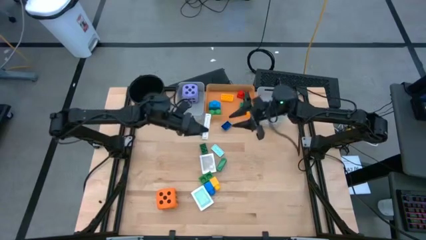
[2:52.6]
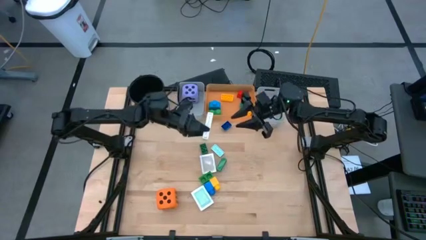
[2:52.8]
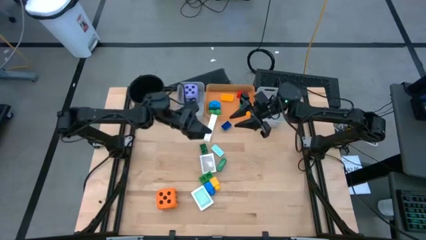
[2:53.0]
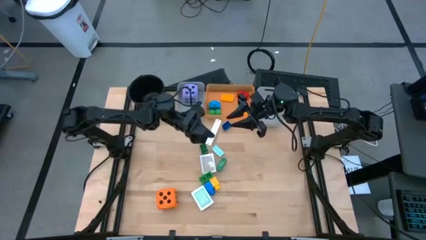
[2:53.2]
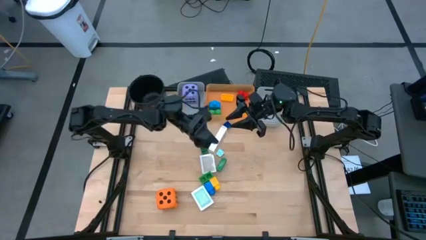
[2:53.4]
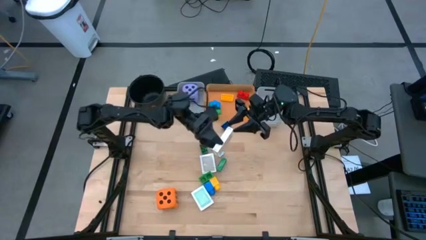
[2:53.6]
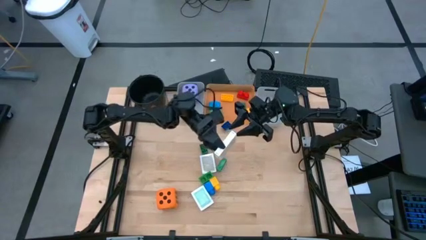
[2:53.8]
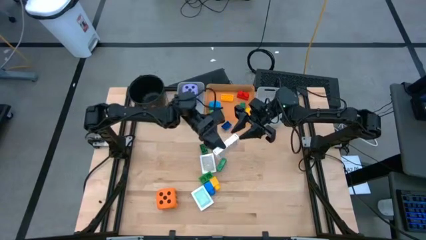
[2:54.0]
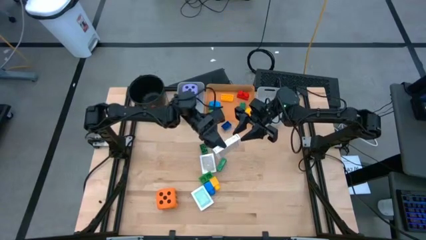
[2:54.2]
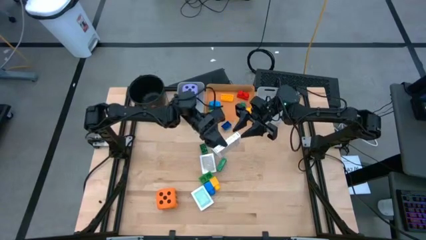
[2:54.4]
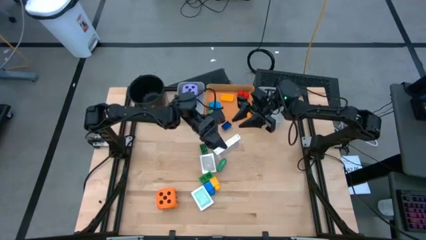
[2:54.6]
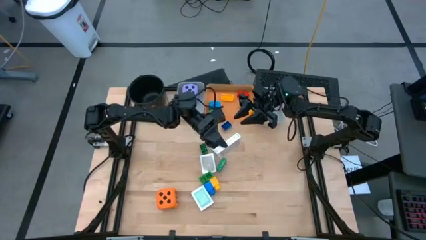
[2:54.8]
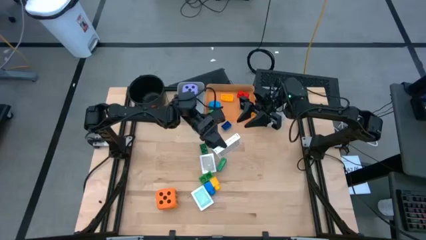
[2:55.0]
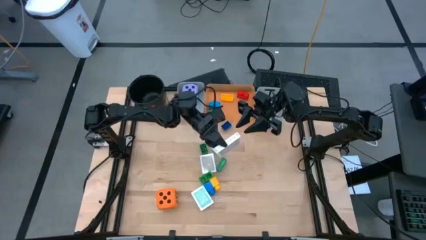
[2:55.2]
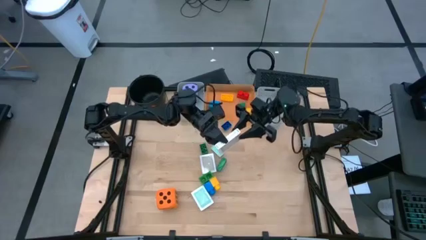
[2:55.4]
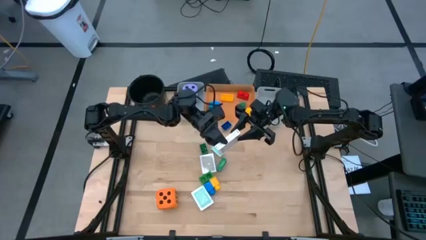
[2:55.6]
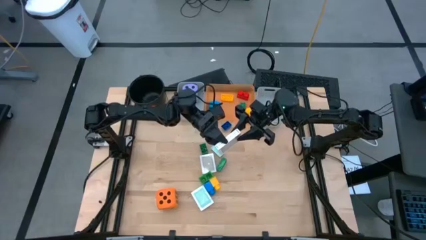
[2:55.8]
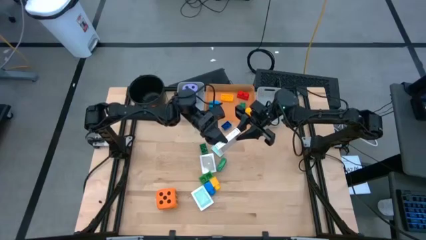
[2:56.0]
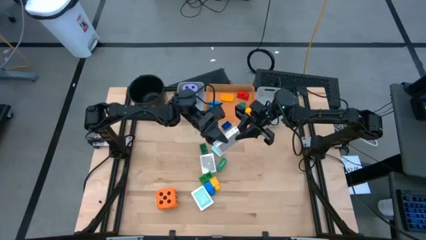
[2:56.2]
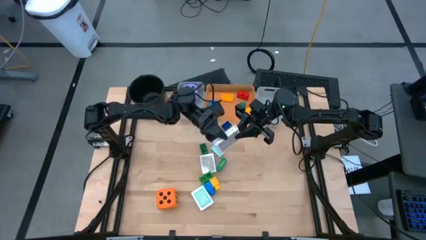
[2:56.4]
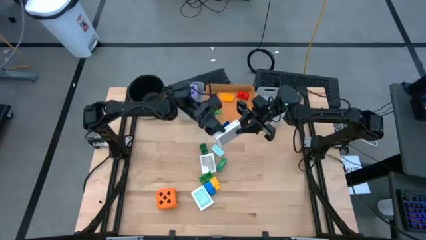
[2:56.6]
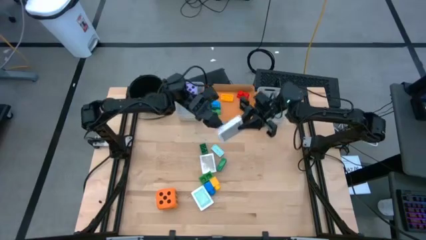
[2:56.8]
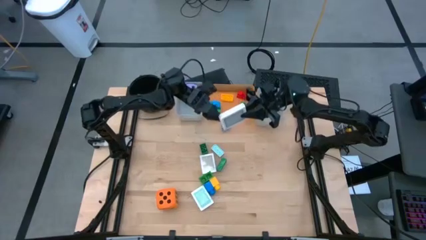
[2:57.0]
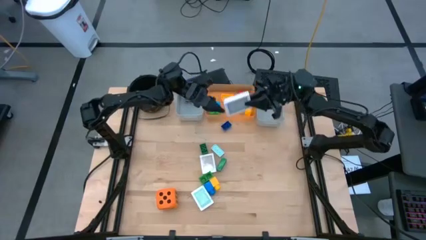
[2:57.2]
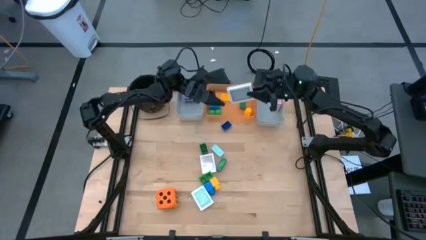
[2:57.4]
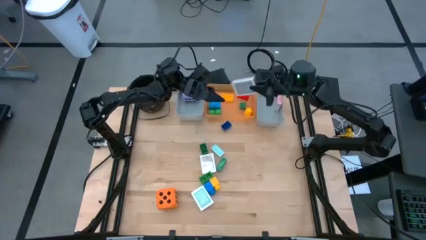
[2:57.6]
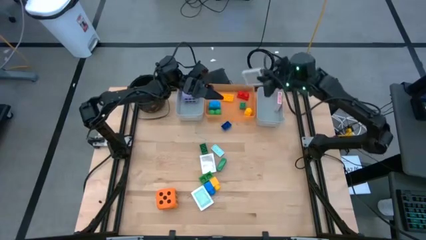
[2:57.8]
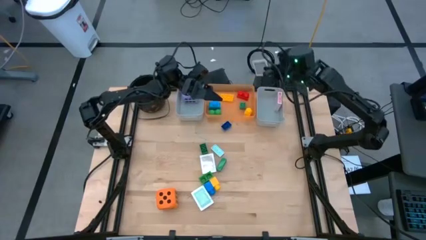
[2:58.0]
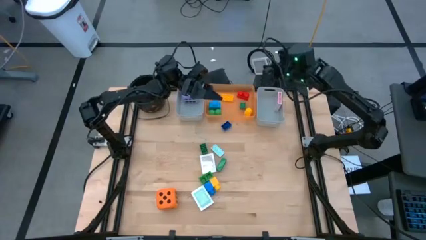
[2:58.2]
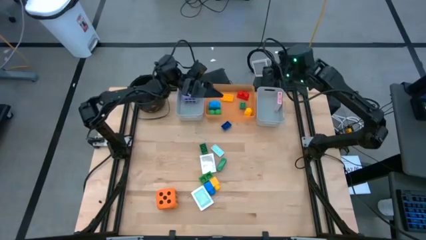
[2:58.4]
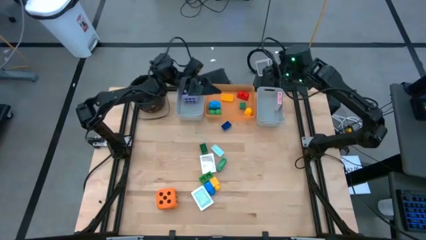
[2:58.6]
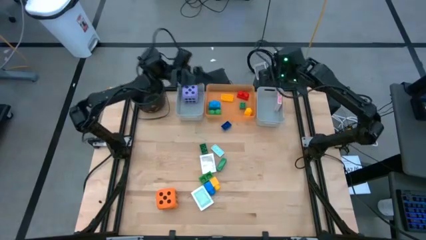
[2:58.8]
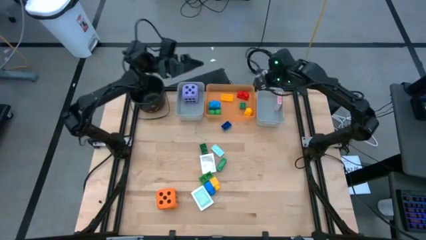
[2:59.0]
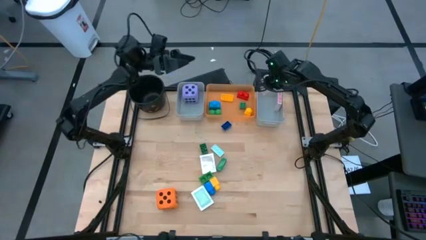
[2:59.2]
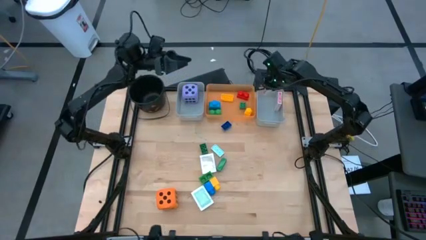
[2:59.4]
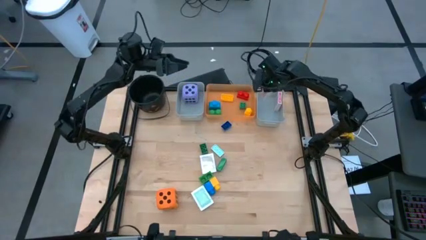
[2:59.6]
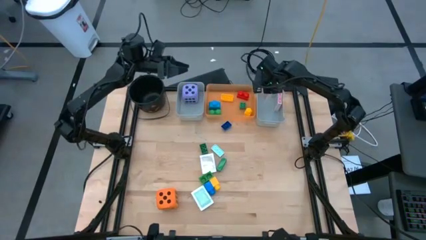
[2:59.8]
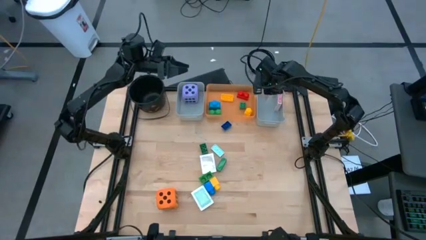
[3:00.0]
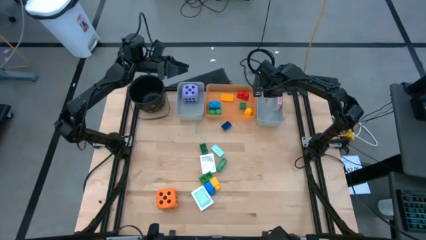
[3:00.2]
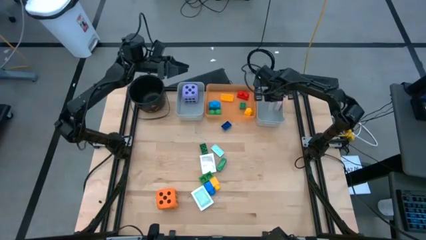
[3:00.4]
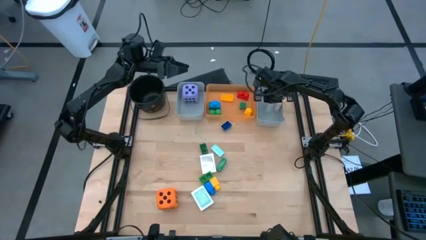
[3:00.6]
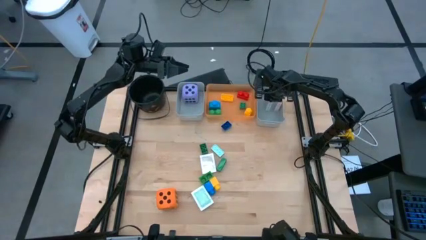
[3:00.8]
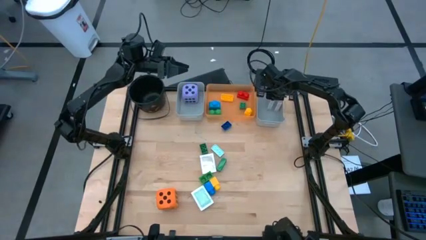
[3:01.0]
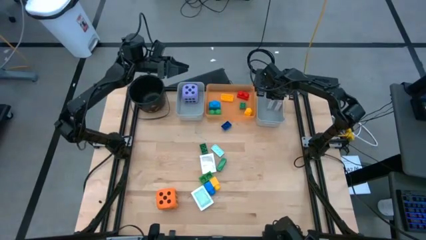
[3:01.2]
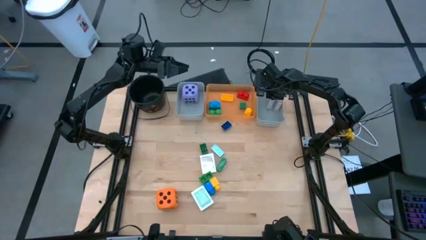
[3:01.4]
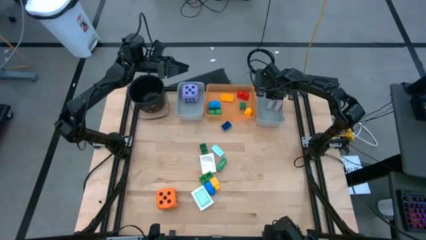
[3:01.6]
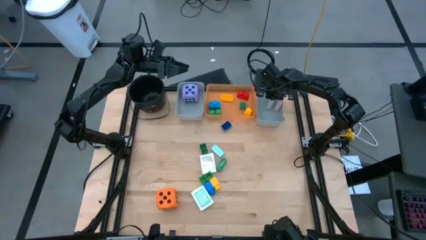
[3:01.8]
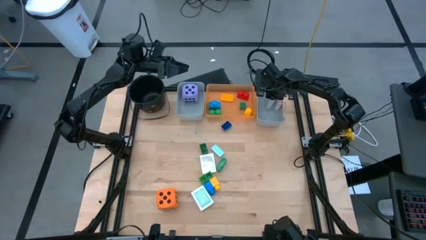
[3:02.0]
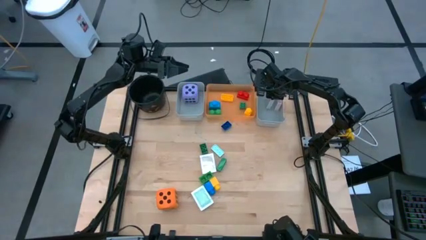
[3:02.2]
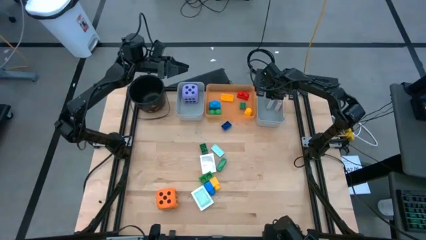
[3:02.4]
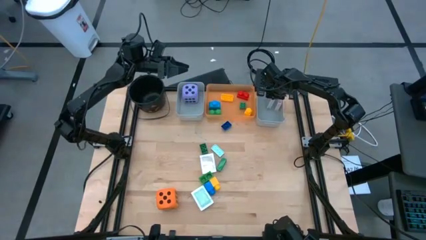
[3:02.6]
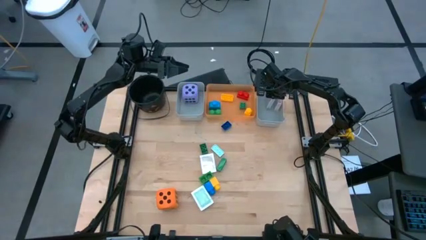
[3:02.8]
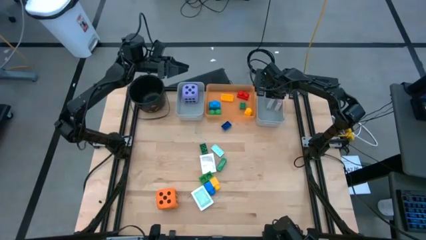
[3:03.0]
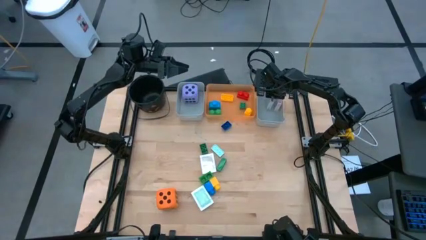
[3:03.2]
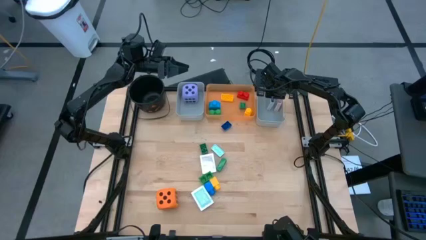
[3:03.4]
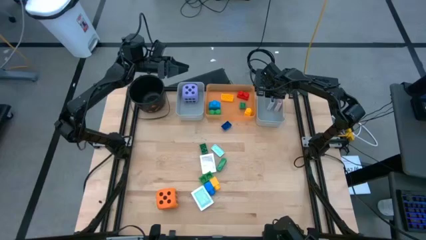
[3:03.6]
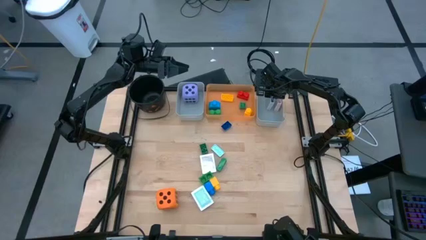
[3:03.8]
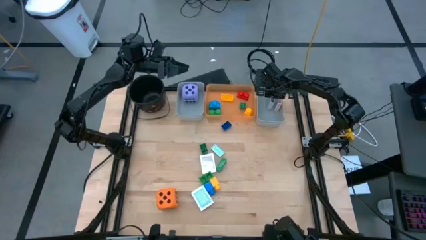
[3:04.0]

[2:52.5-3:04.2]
Task: Pick & Place Toys
Put the black deck of cards into the right gray bin
